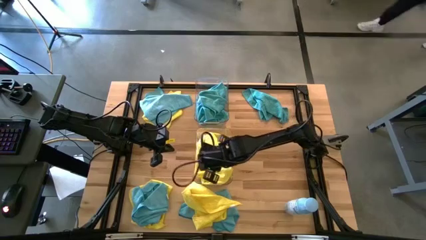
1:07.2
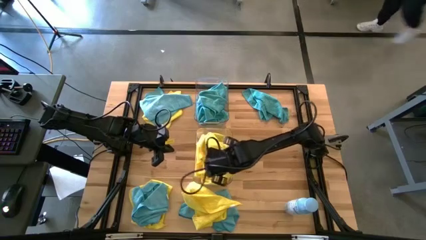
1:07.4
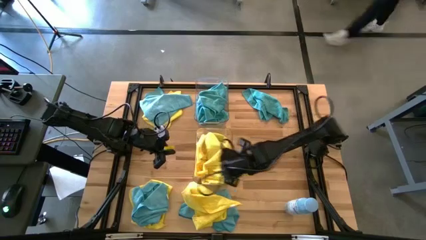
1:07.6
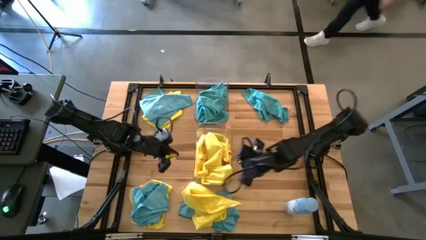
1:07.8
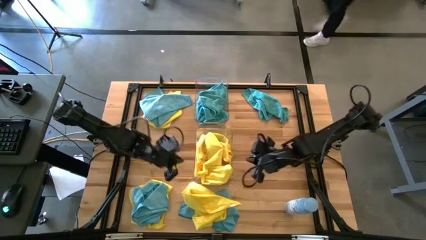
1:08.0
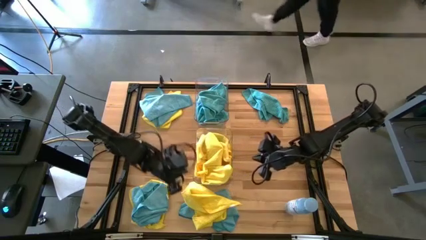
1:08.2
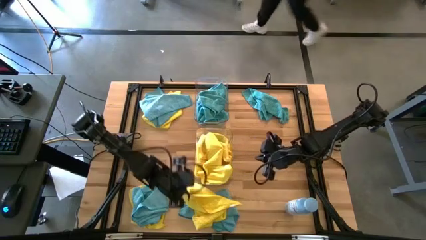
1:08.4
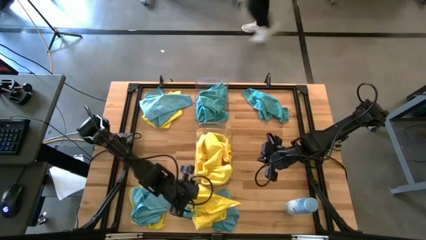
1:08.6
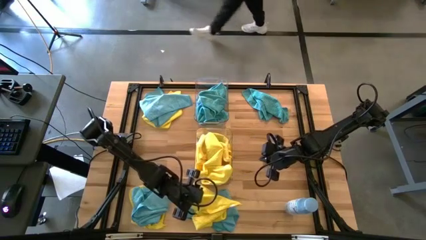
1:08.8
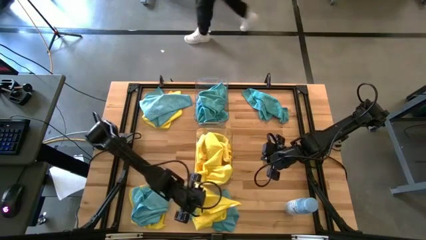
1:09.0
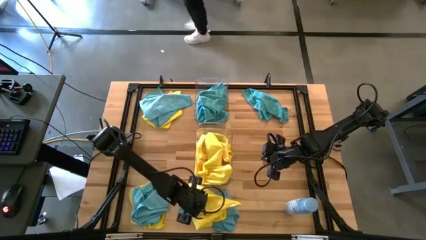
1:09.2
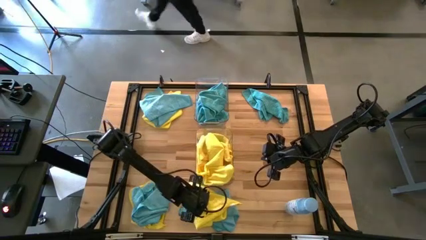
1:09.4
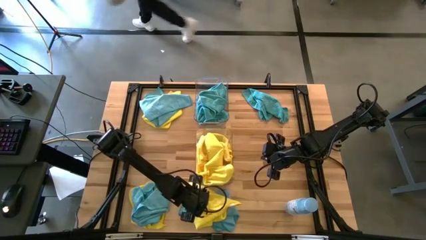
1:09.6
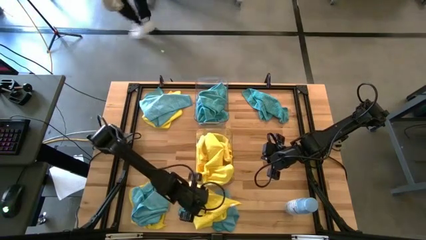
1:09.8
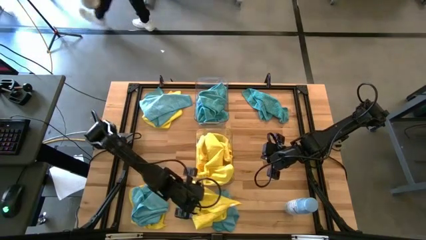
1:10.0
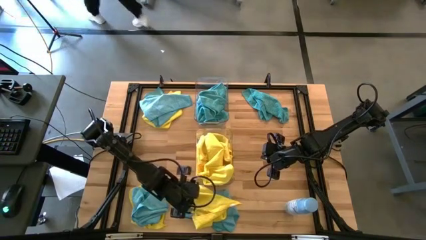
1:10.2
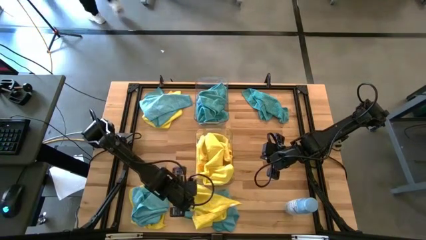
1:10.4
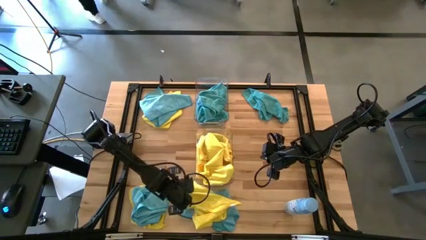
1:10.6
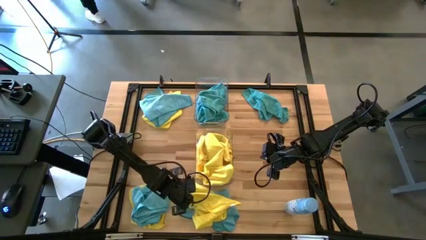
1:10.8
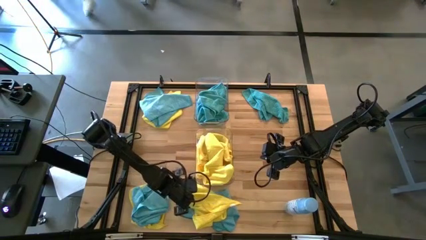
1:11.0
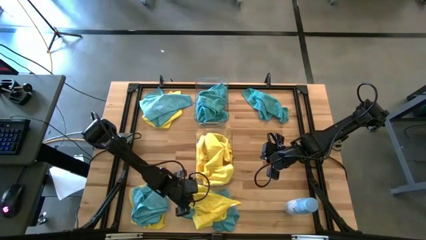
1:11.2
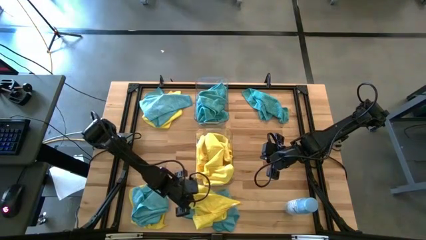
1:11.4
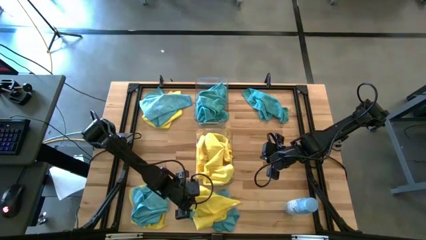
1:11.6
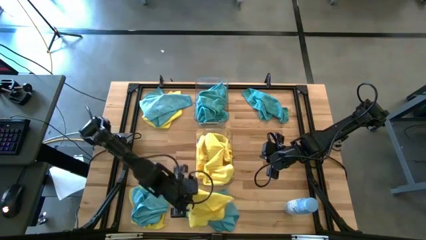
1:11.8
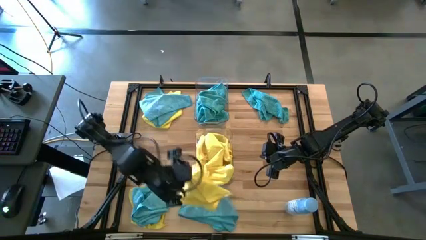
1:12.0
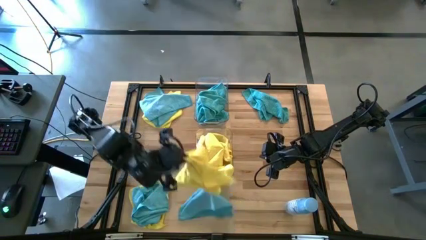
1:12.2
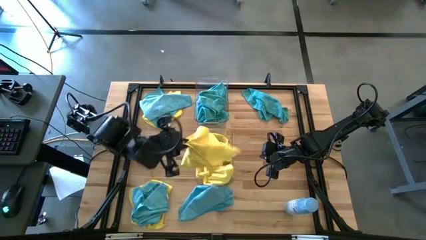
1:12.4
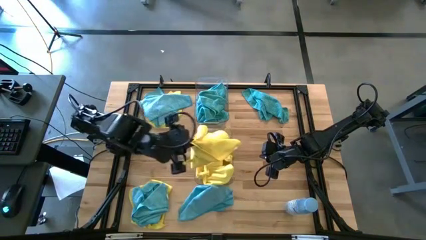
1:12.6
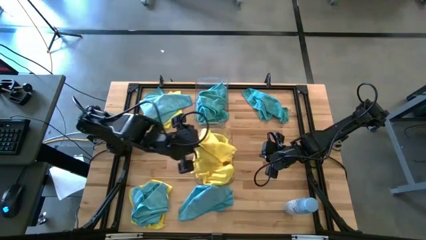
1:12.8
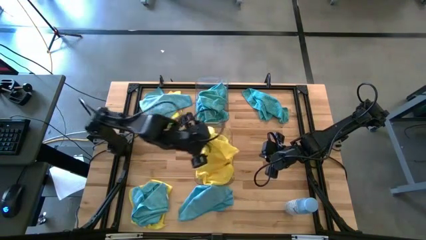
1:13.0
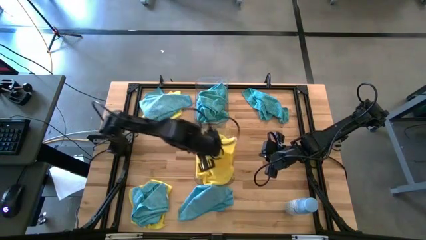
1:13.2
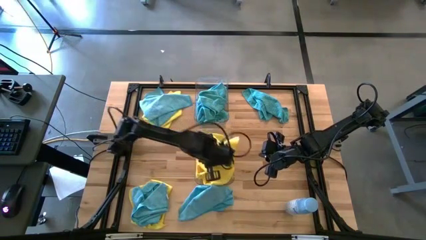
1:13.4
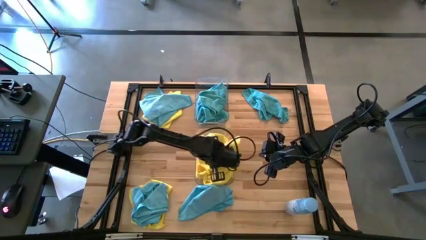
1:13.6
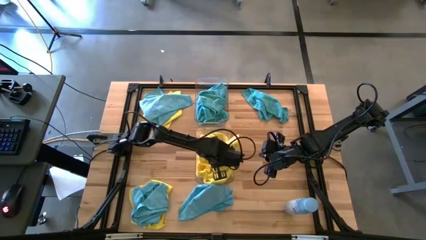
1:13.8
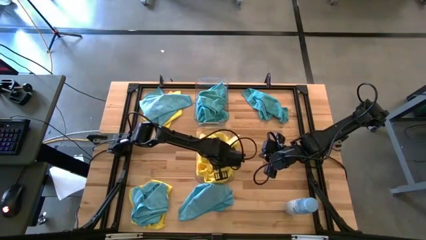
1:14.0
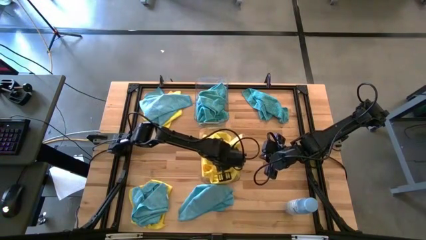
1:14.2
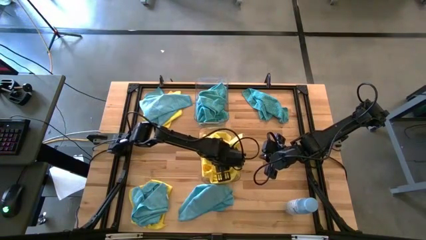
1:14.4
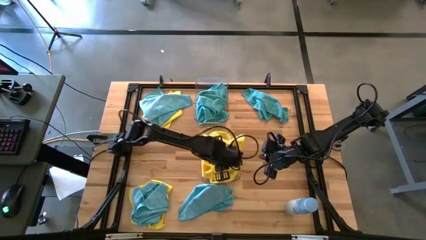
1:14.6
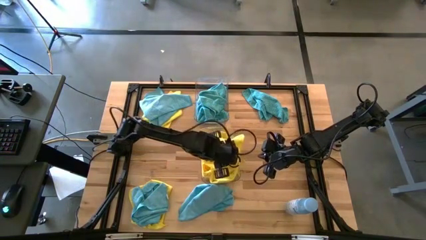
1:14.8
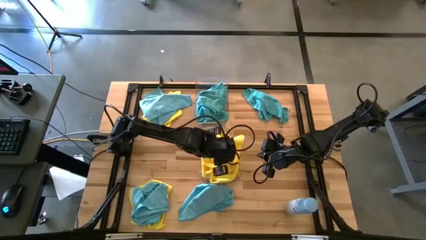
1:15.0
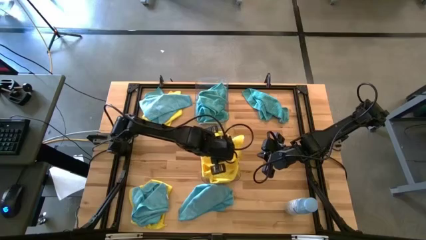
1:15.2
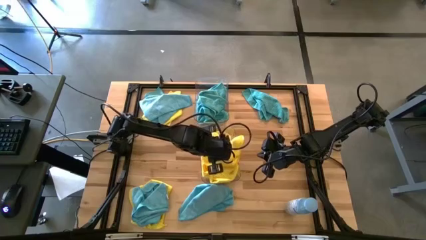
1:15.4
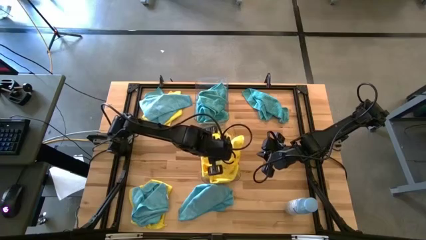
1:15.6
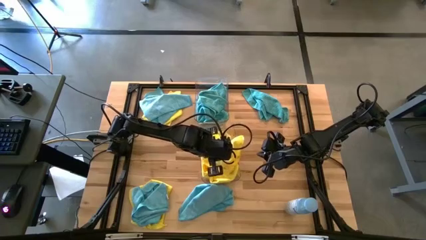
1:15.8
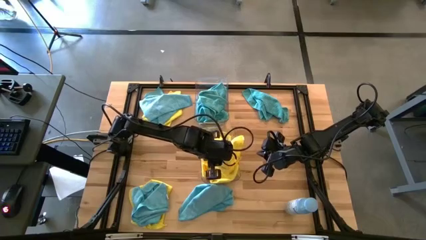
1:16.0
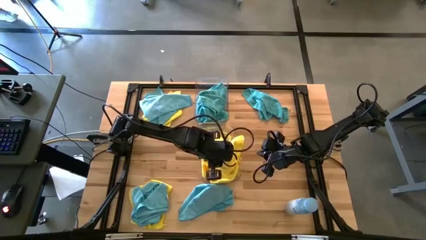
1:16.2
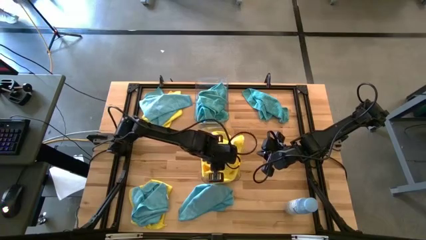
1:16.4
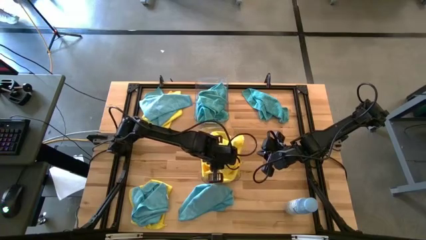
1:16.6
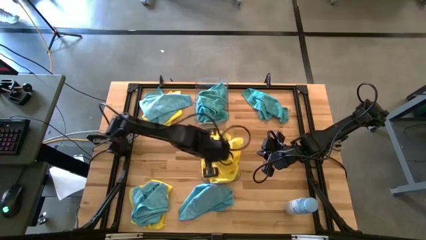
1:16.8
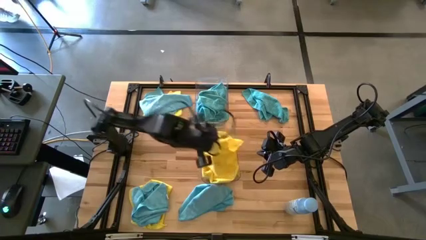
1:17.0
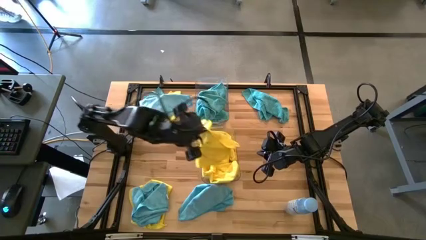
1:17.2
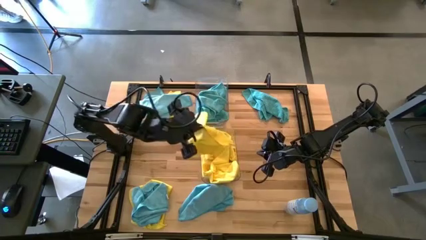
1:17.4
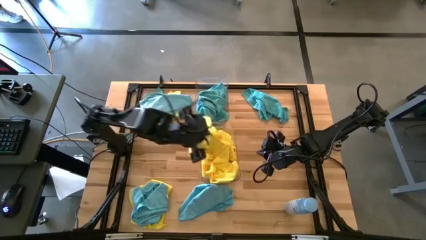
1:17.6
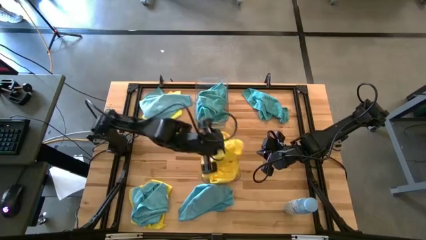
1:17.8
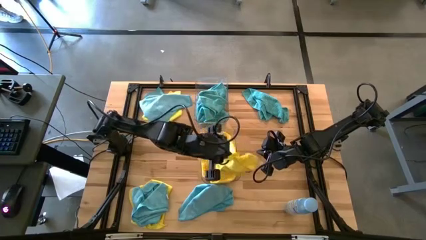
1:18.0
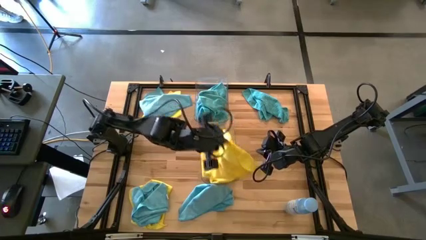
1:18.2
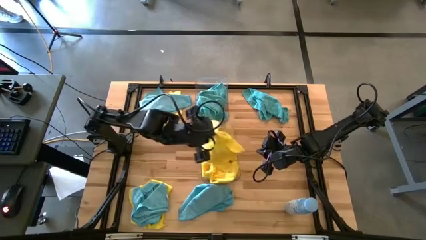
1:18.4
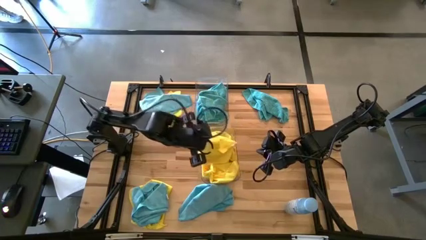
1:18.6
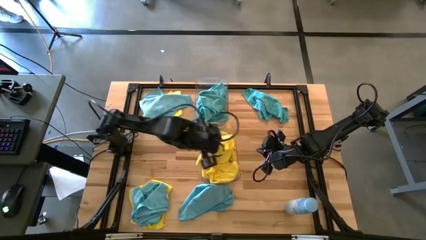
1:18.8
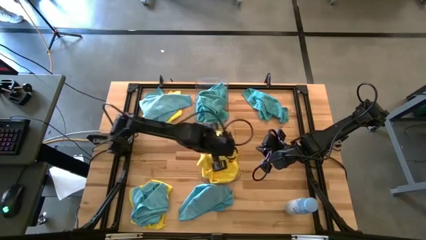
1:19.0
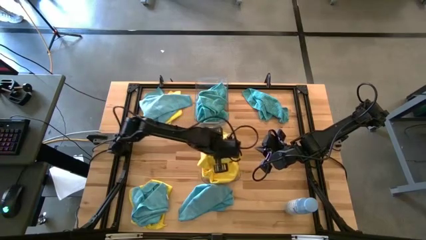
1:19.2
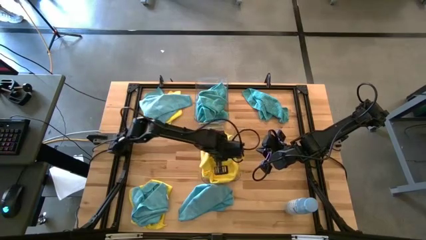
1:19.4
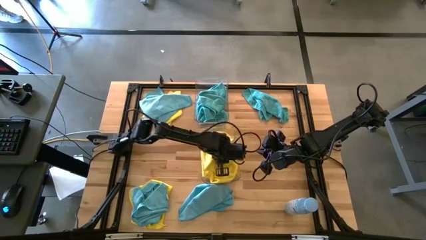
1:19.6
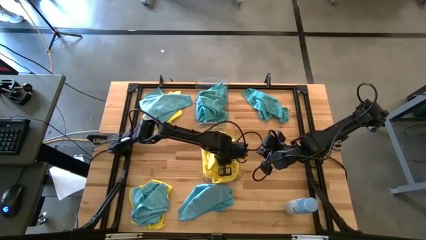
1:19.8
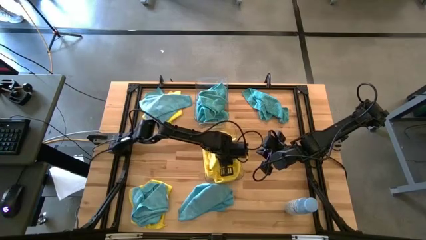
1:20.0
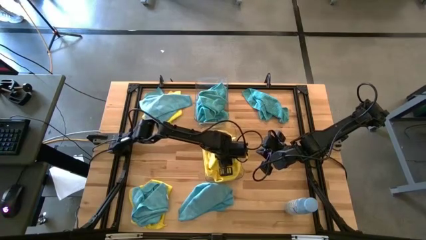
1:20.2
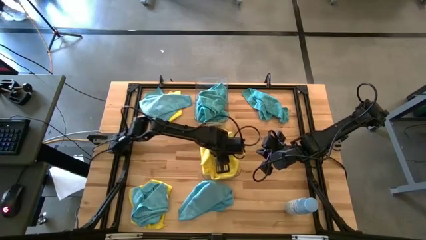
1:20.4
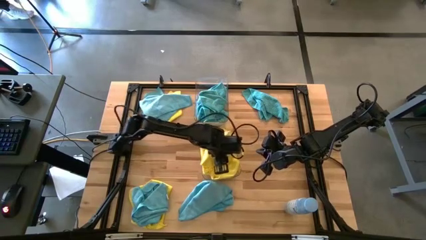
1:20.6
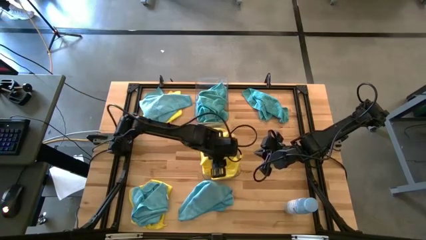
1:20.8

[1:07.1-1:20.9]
Task: Sort microfiber towel by color & place in baskets
Put the yellow towel into the bottom transparent bin
